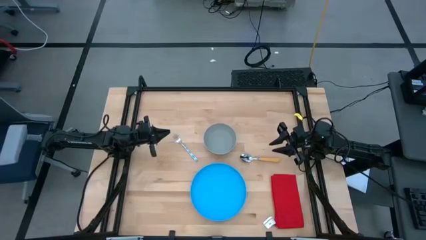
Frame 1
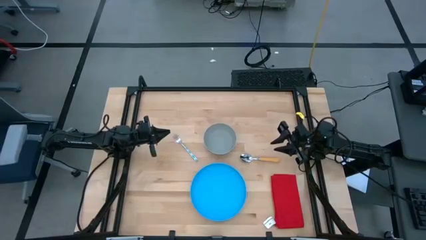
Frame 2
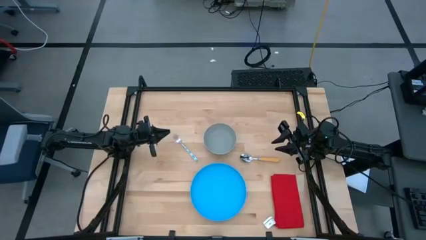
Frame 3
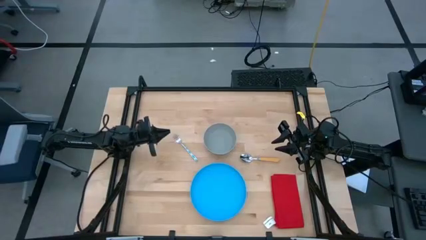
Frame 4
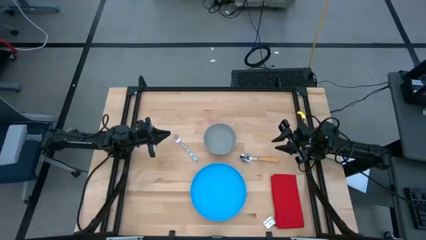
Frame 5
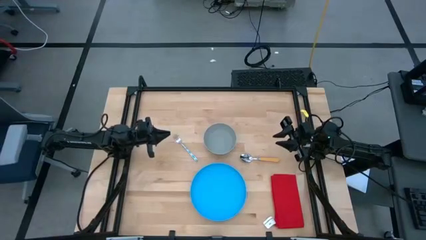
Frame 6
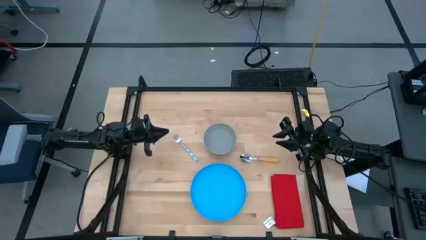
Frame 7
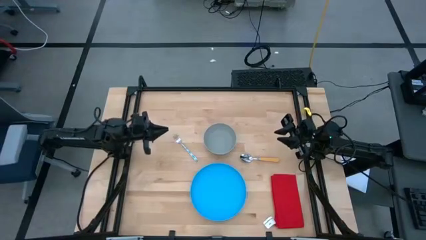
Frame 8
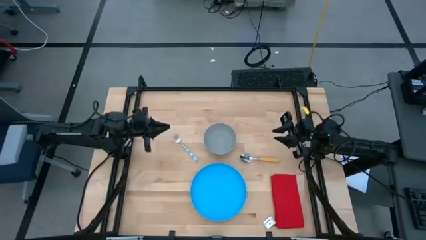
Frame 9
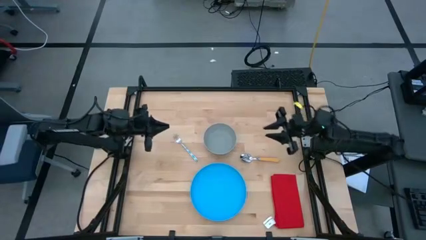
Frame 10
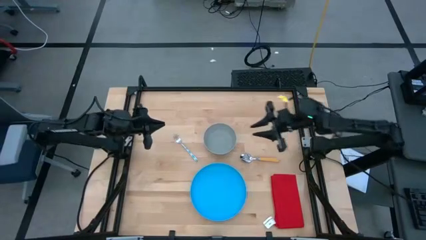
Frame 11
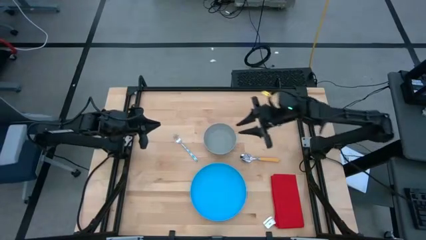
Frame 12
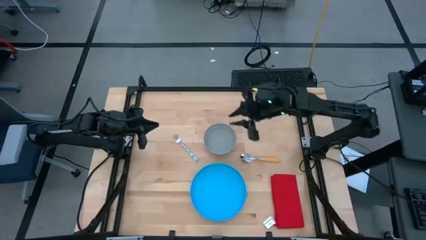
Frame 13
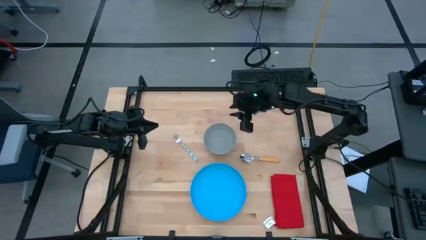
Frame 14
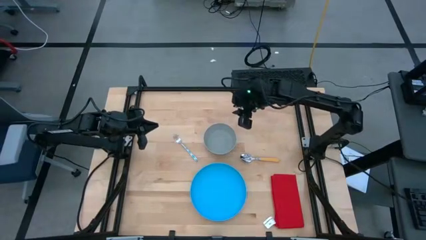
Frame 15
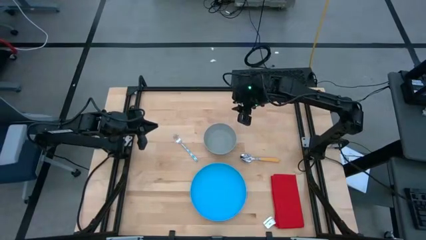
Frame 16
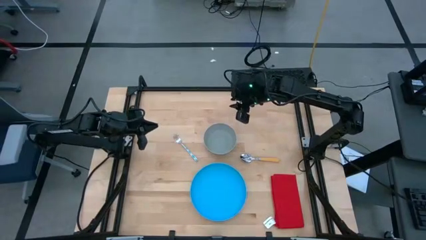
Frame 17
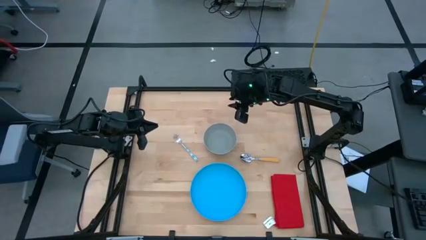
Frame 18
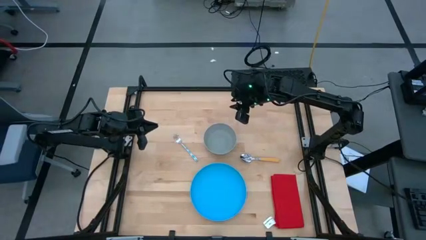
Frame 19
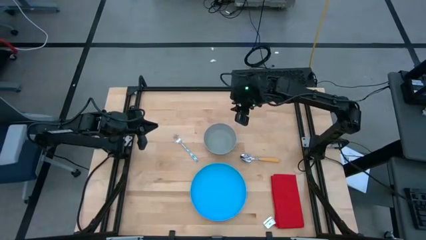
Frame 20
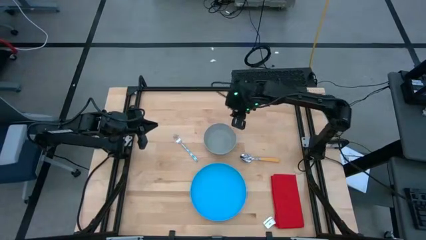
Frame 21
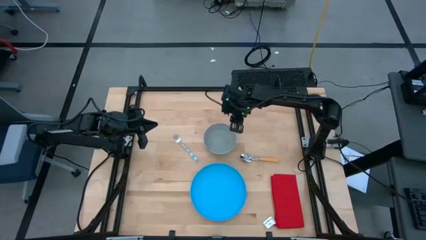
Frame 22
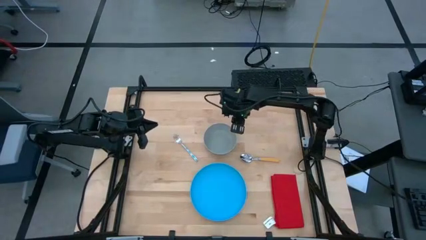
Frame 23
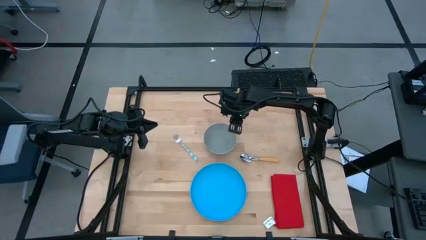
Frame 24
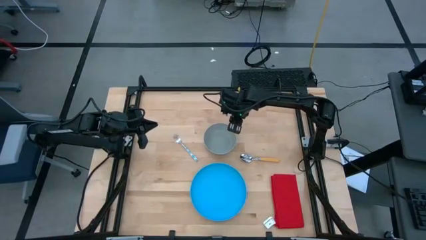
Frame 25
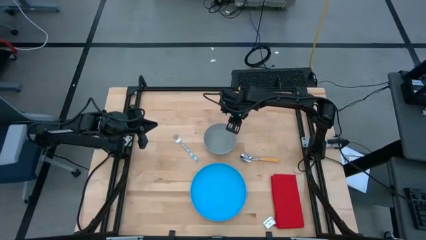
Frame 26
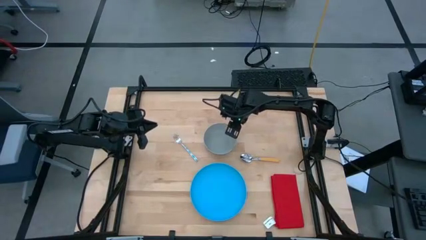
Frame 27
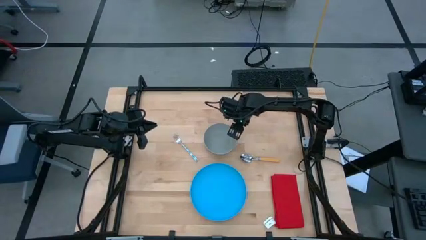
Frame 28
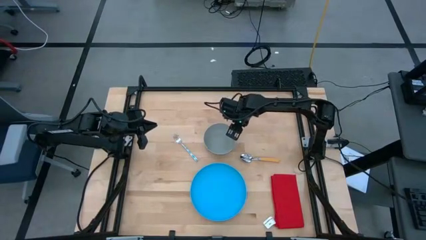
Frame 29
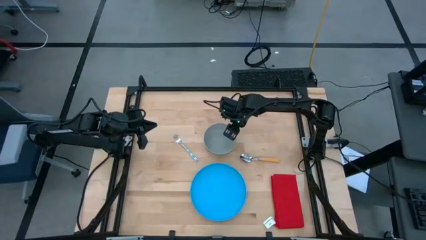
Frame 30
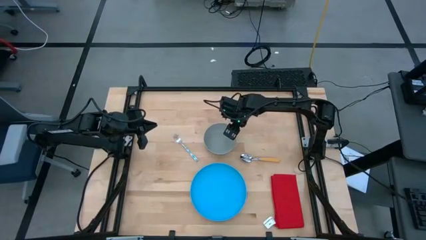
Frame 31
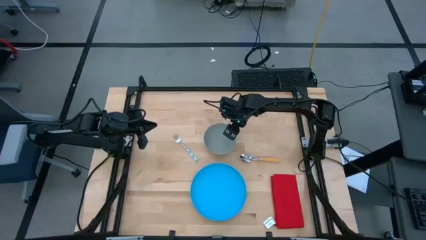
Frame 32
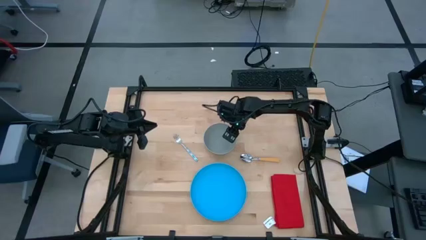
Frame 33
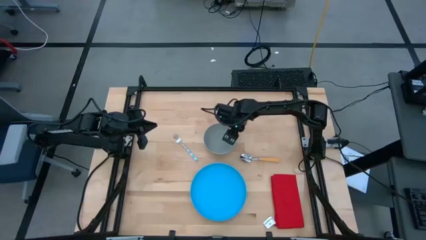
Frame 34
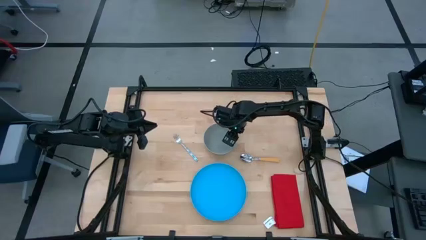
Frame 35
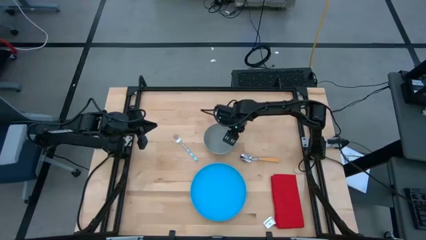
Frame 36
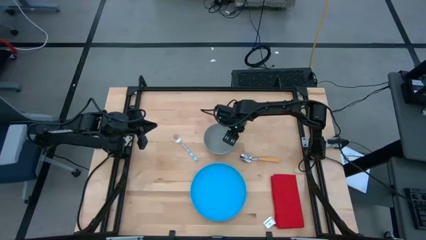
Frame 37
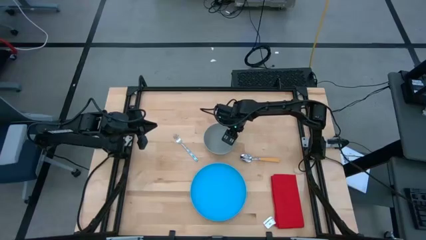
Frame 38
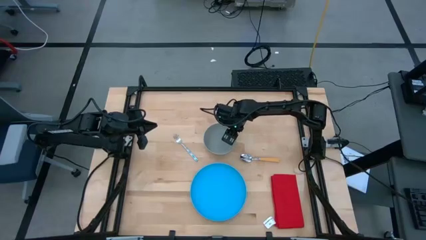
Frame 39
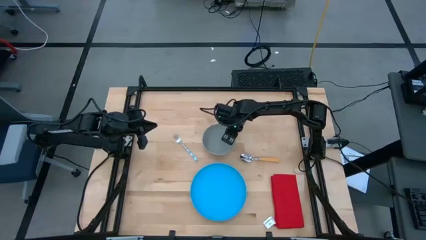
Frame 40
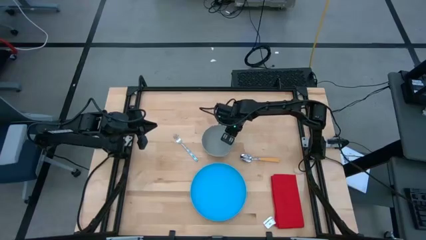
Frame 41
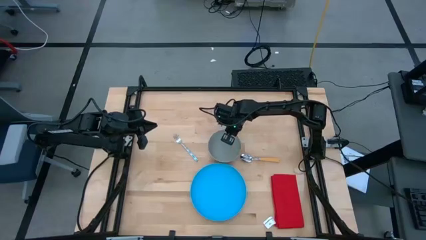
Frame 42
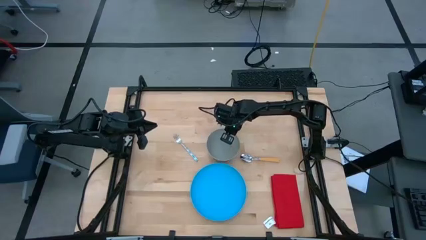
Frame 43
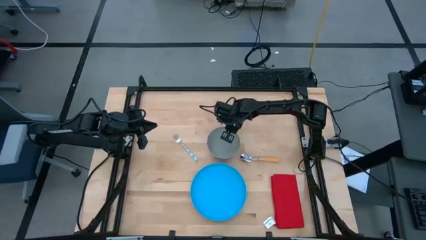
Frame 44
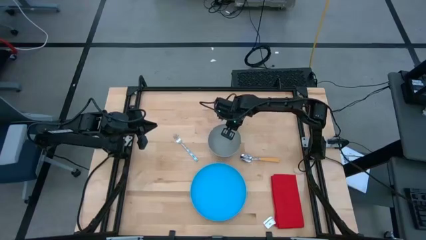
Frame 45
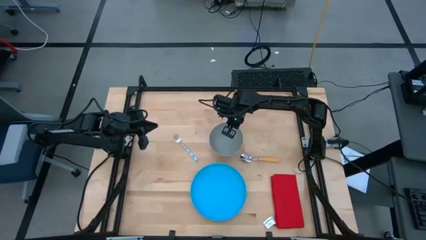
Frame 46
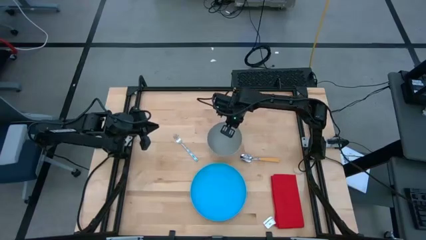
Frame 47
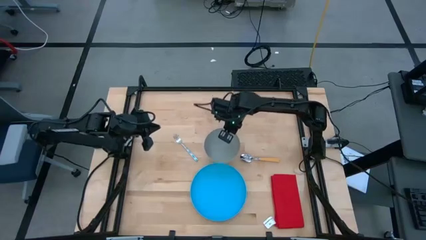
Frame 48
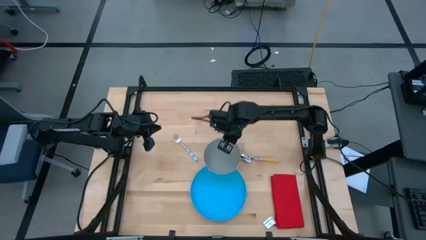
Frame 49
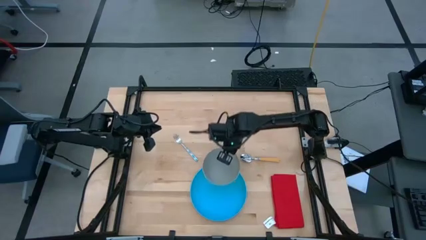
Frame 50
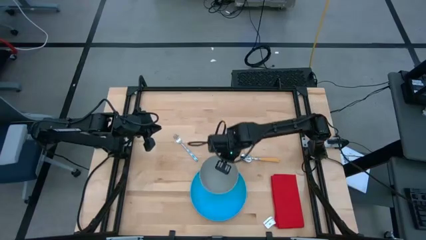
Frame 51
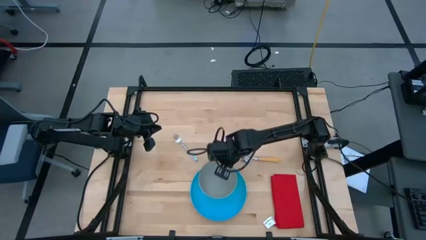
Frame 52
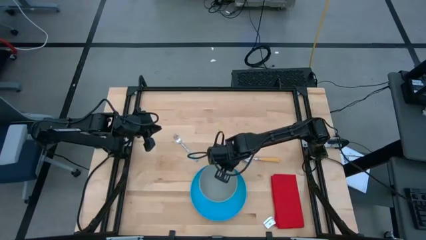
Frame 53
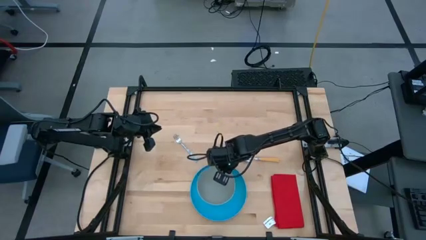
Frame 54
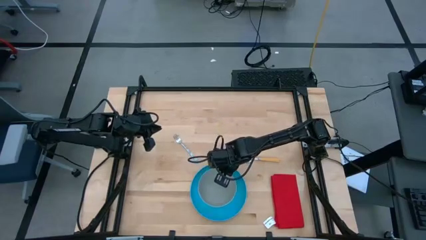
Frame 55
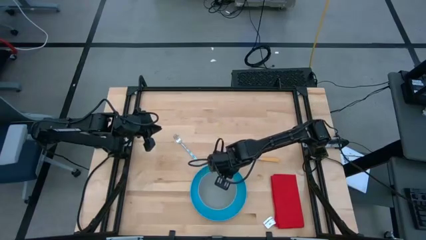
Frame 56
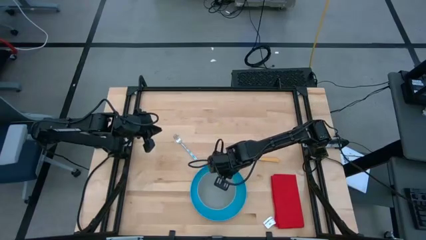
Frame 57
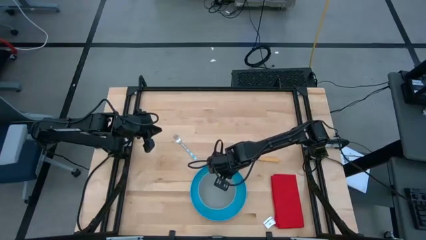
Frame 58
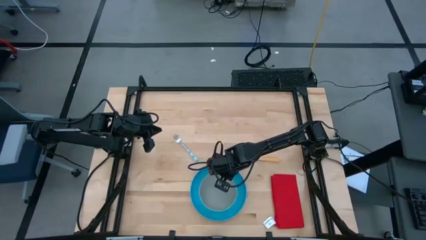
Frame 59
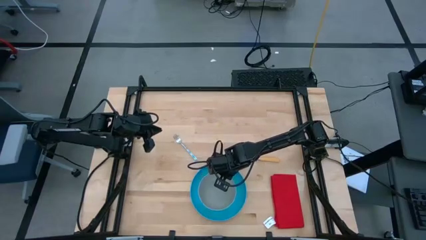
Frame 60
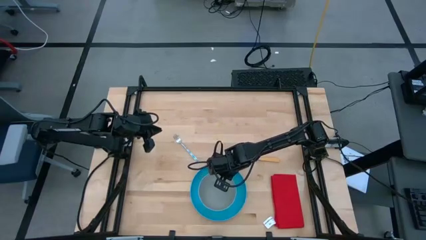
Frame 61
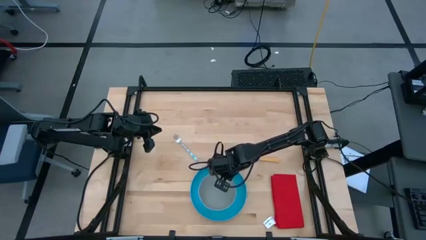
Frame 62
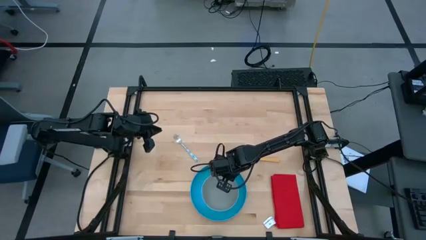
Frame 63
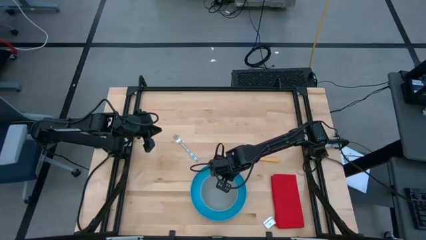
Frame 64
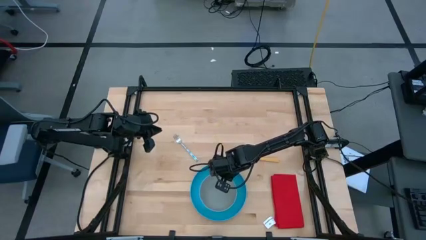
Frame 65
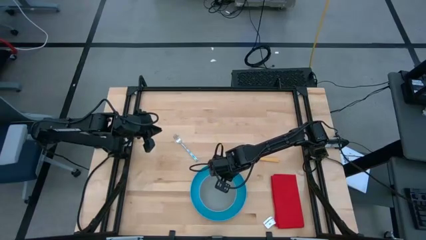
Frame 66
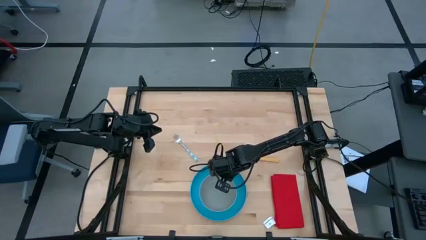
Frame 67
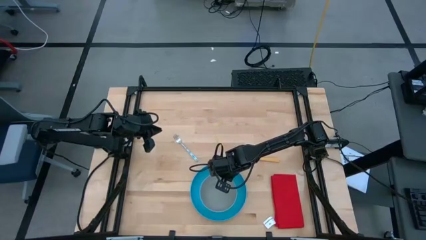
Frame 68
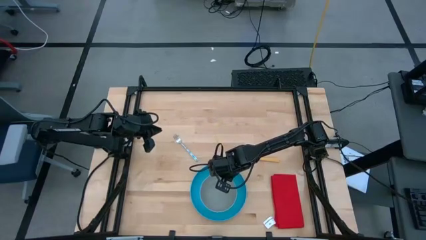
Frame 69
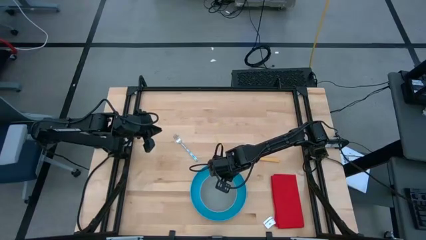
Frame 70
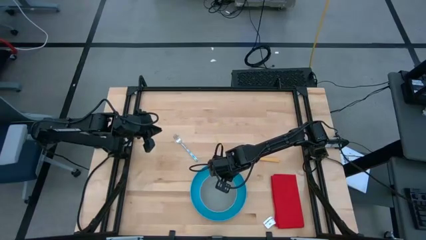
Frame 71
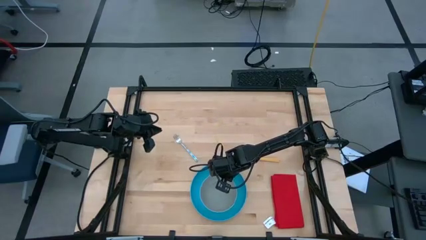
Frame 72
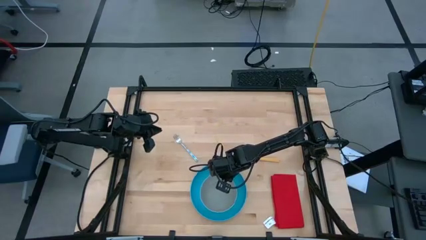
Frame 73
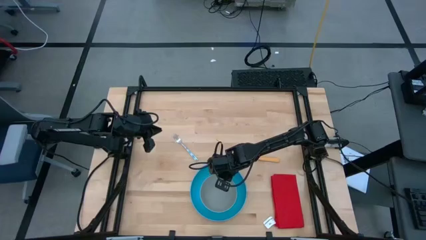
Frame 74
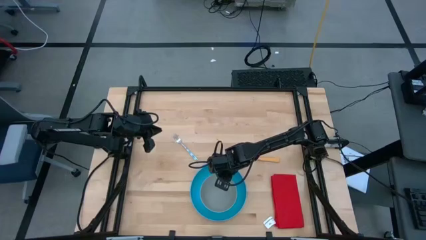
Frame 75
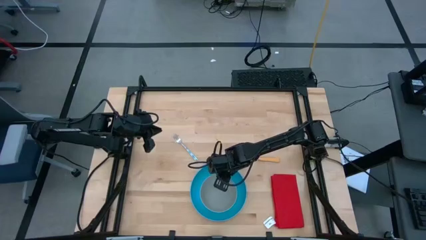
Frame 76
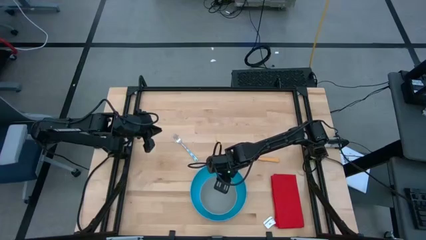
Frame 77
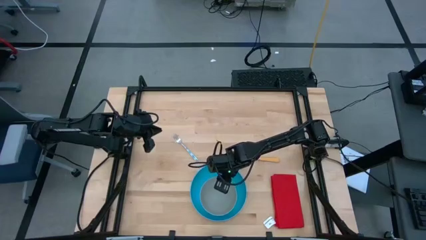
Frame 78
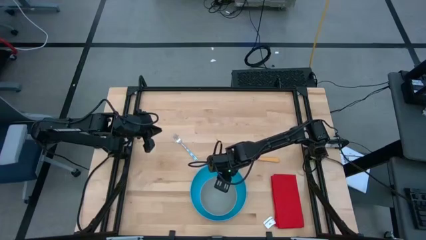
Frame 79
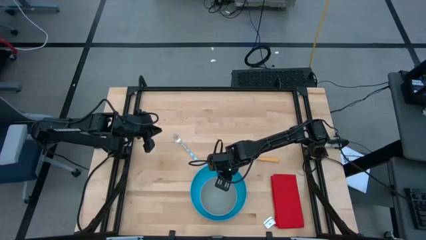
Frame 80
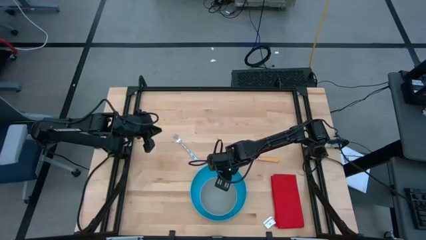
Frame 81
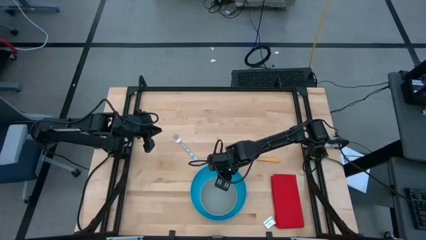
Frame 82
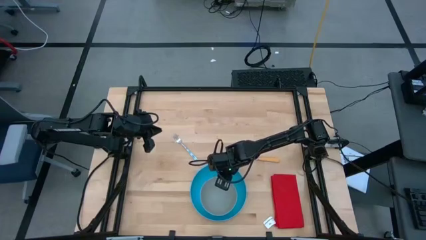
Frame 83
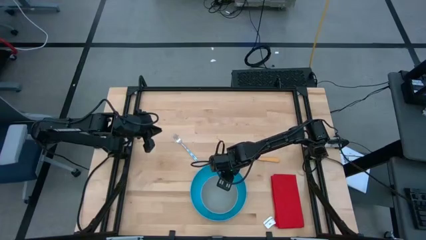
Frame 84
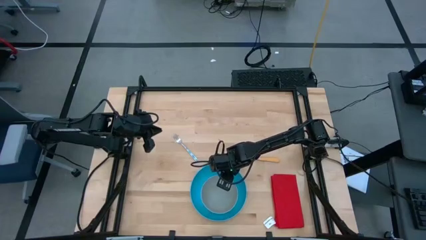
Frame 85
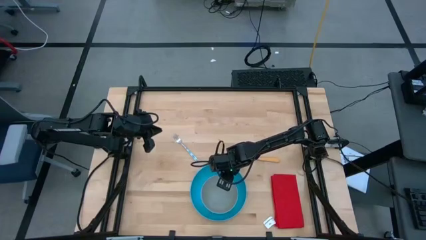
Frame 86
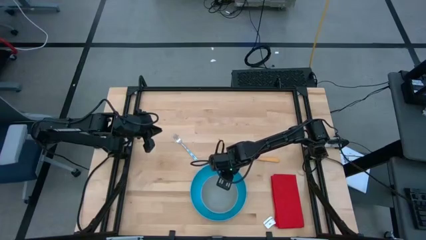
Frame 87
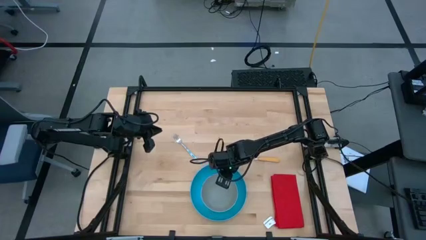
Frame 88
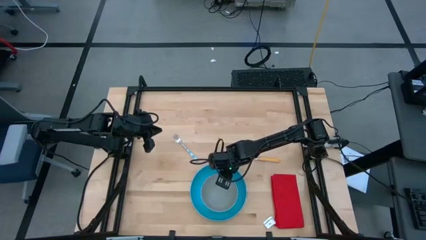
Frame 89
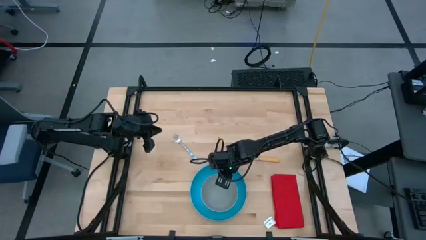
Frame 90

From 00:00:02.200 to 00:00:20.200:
Task: Pick and place plate/cup/fork/spoon on tray
Put the gray bowl on the blue plate
